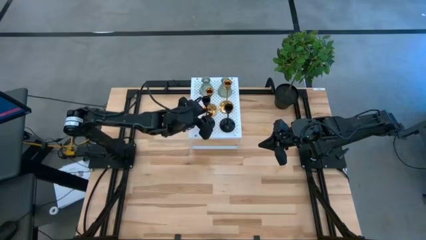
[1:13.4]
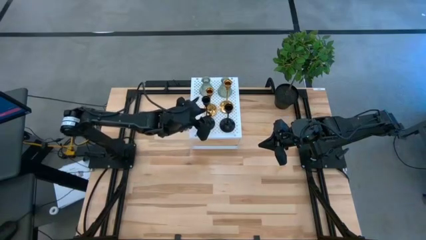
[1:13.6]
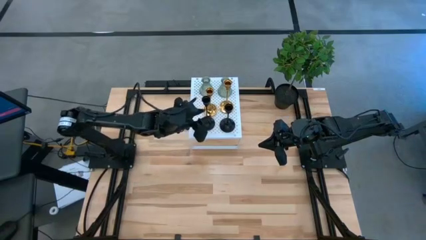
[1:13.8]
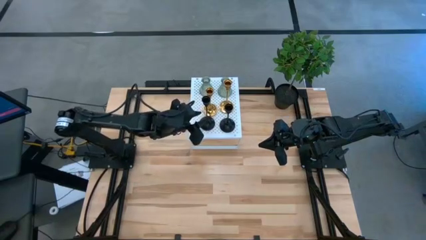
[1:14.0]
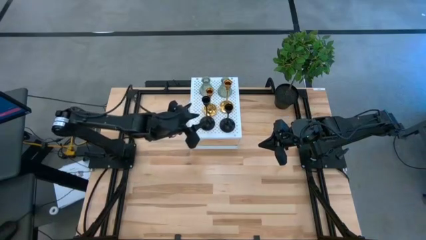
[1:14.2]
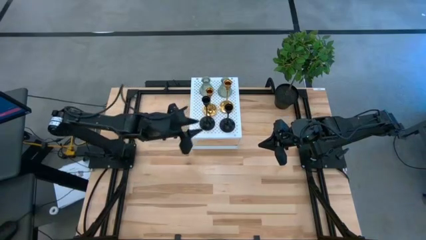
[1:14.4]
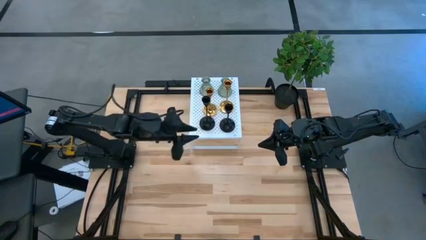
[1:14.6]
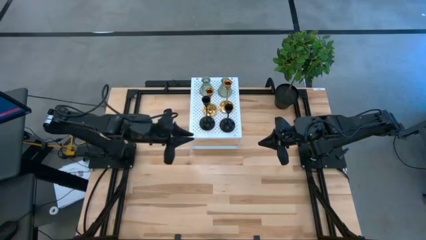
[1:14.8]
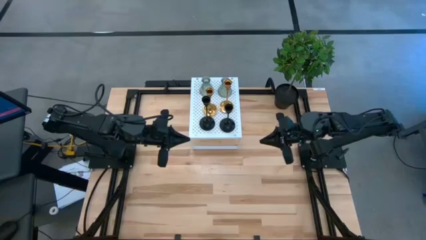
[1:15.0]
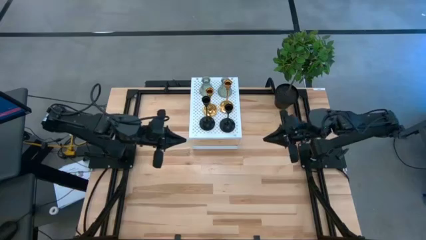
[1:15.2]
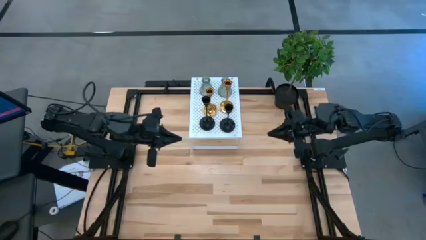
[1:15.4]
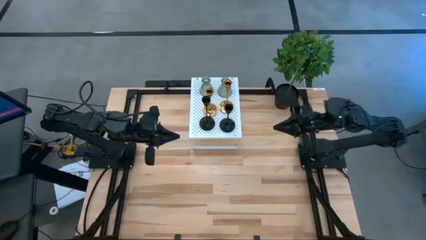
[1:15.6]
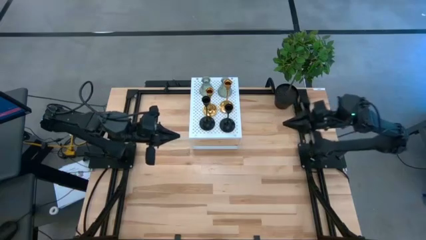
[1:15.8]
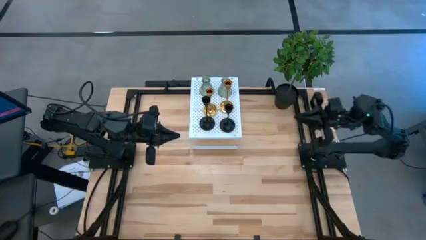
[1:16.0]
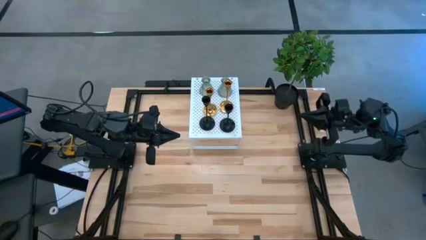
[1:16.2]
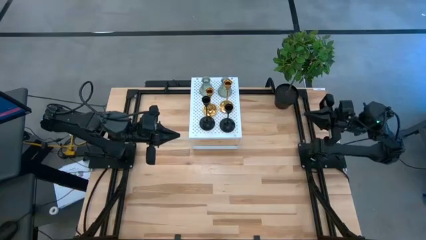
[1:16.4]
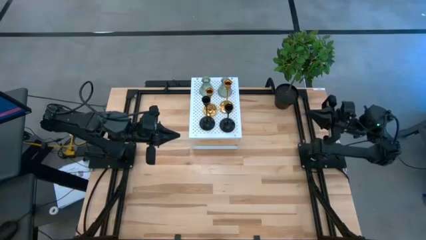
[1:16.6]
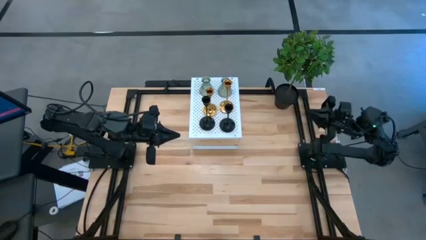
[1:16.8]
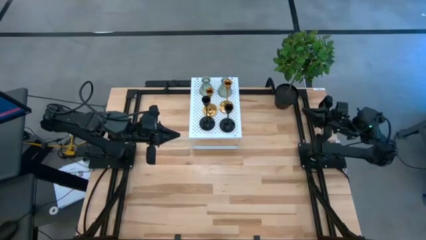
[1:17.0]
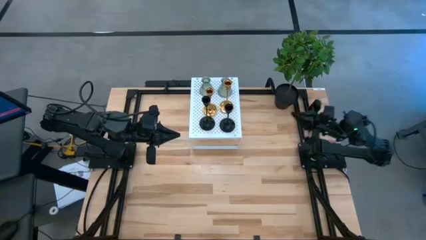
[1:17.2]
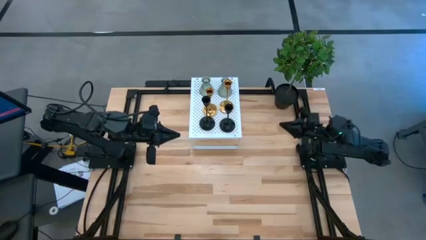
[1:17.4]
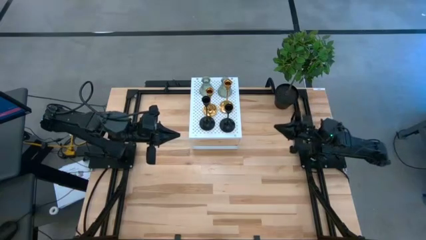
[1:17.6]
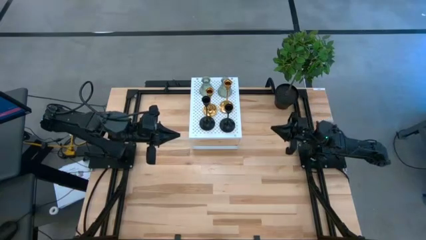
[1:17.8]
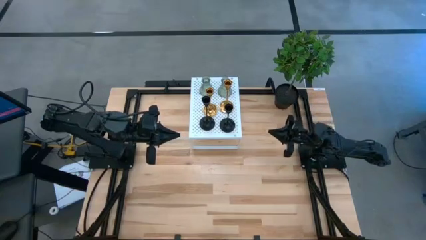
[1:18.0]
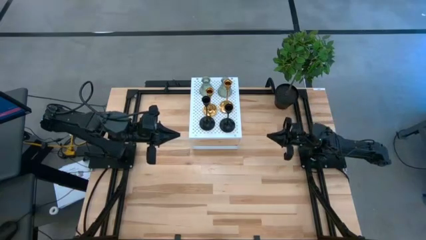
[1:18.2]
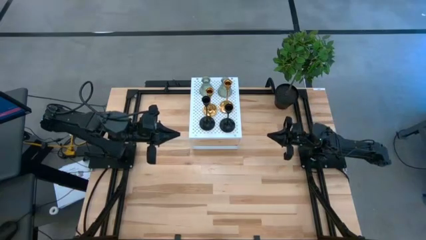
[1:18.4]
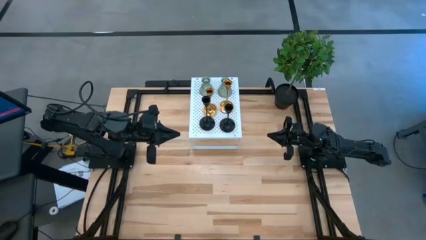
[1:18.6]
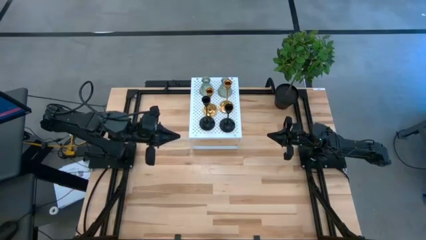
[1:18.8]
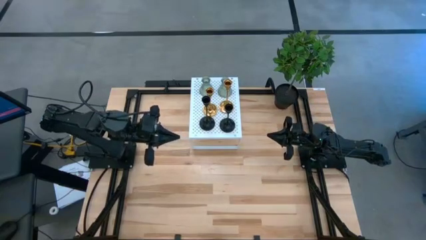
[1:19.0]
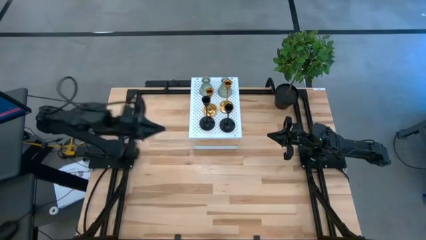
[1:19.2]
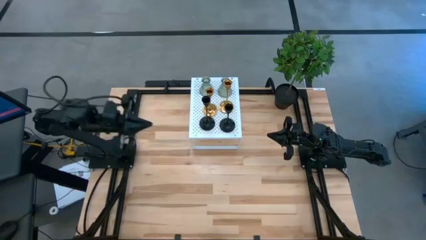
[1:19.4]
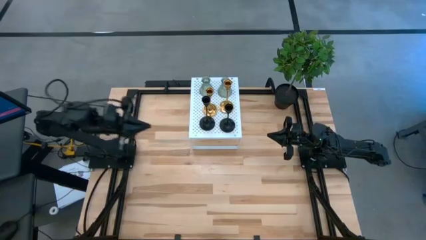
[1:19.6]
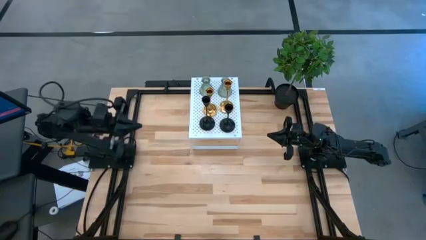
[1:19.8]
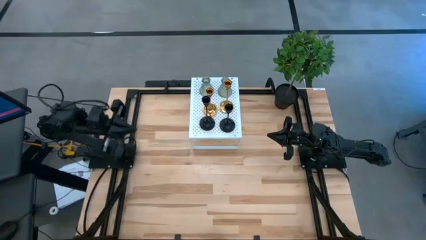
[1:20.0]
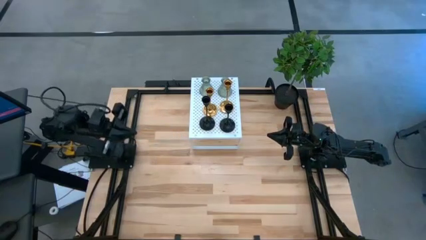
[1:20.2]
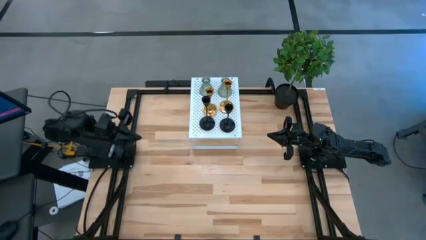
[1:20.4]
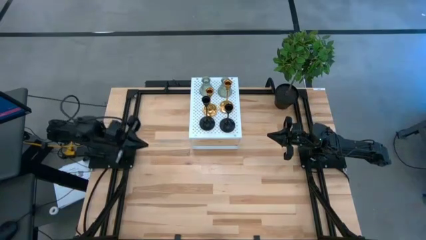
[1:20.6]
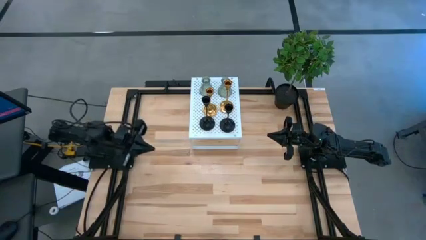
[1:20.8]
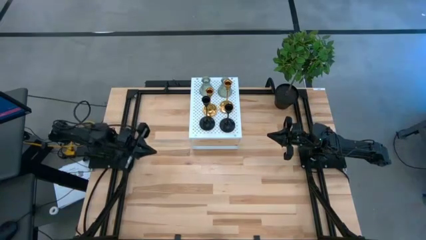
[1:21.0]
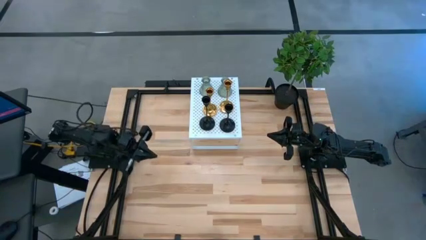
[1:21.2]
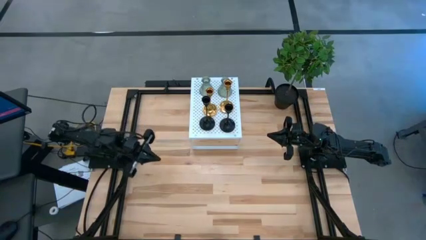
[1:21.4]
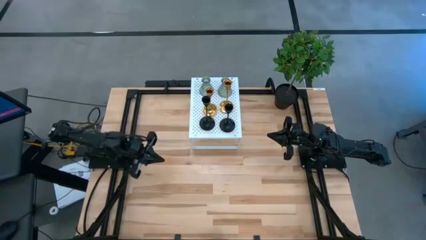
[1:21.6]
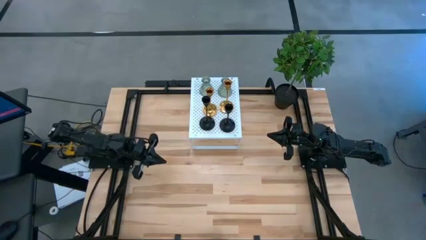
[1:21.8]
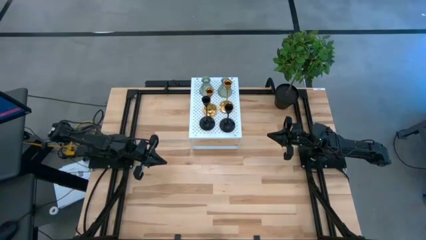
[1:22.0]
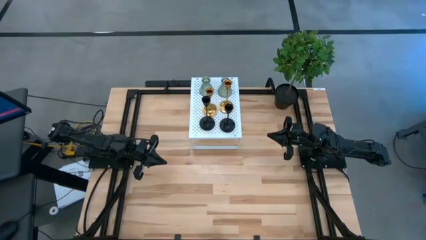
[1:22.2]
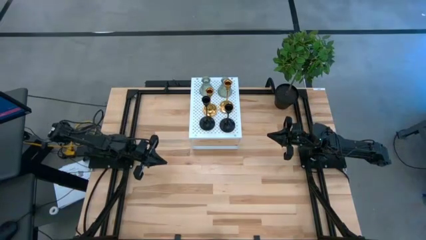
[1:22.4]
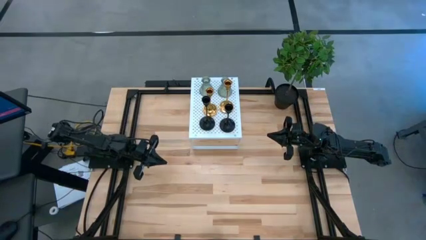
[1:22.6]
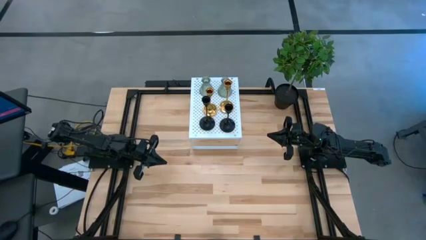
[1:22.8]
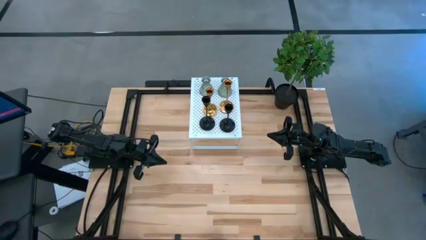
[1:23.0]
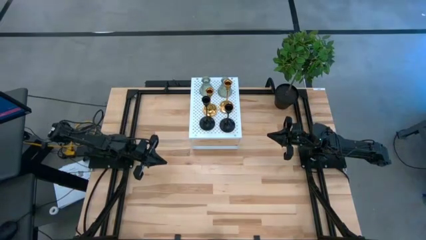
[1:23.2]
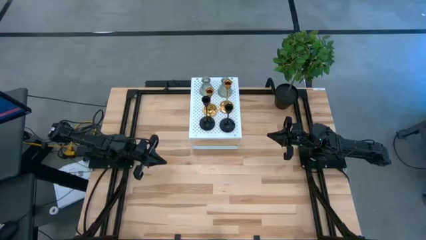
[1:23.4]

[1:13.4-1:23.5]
Task: Pick & Place candle stick holders
Return to Home Position
